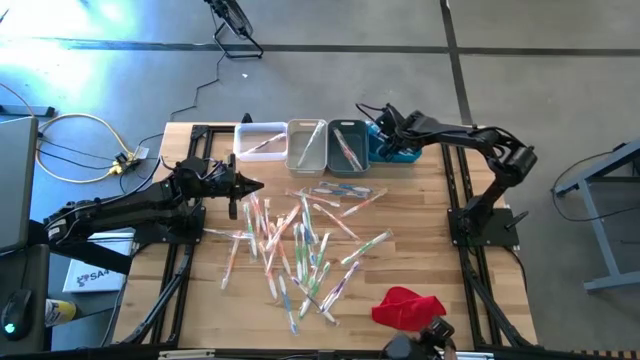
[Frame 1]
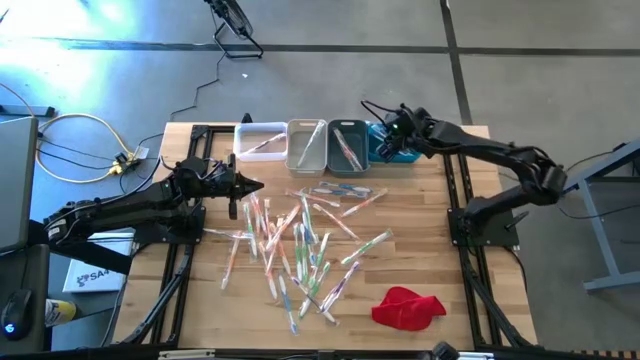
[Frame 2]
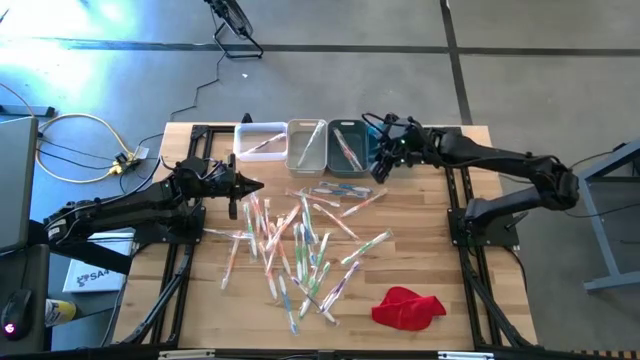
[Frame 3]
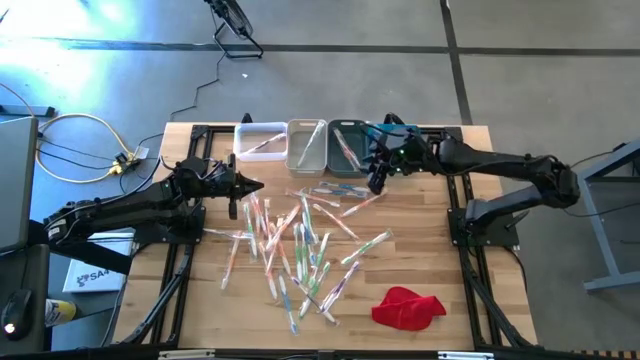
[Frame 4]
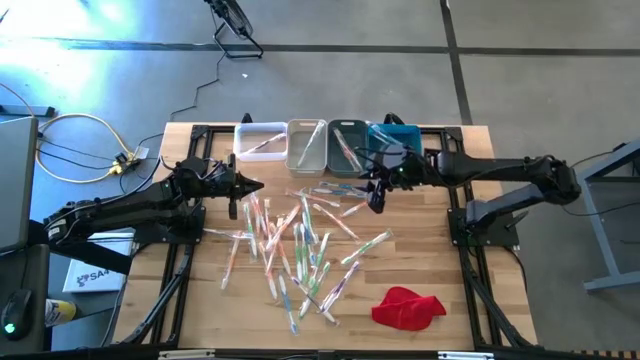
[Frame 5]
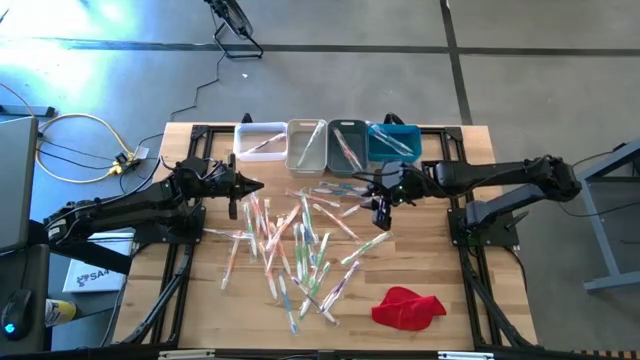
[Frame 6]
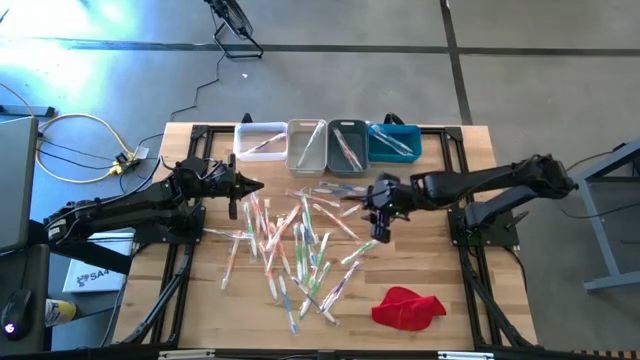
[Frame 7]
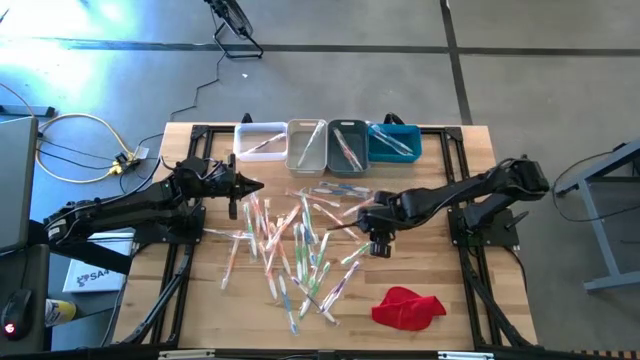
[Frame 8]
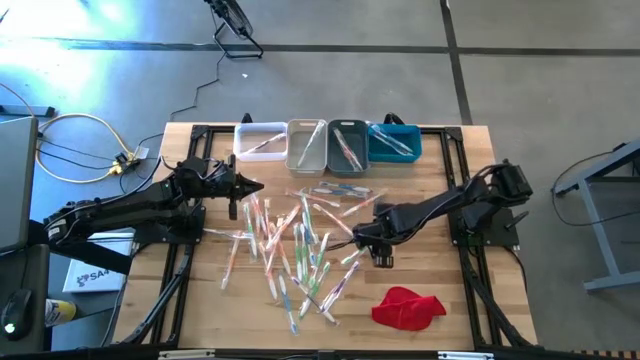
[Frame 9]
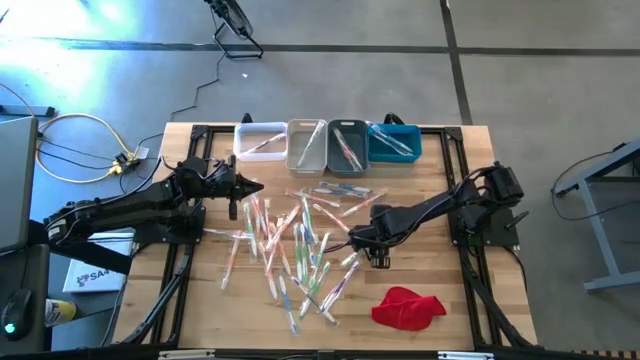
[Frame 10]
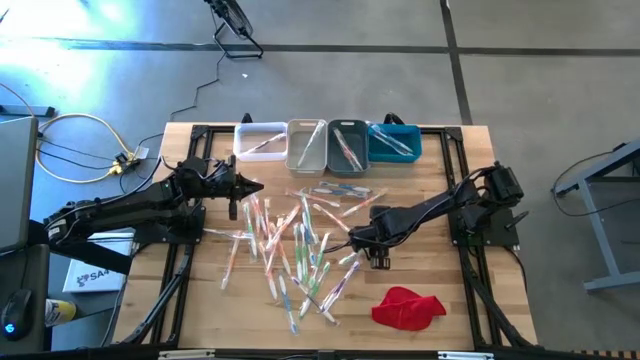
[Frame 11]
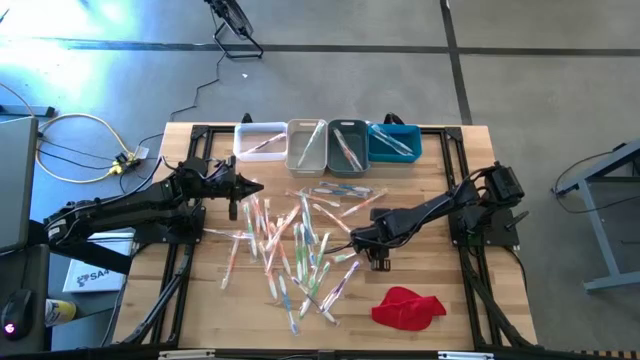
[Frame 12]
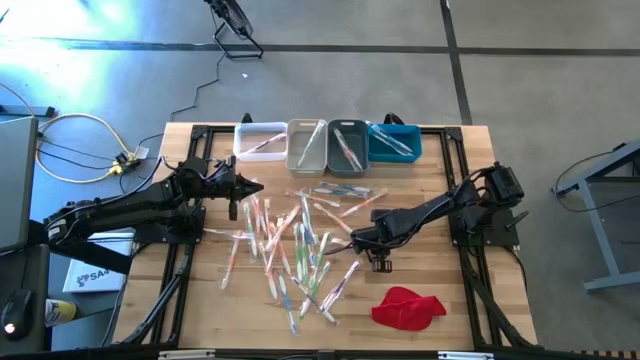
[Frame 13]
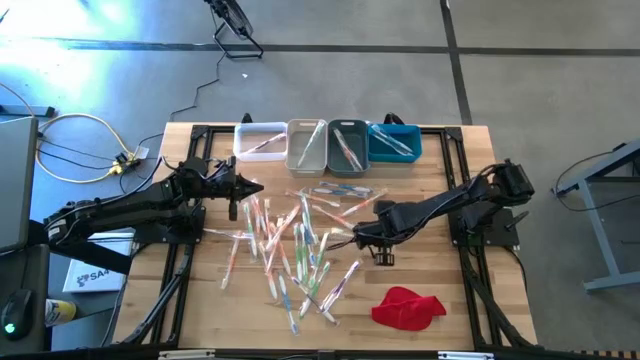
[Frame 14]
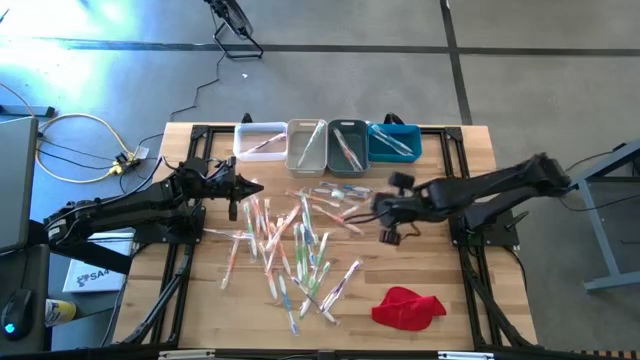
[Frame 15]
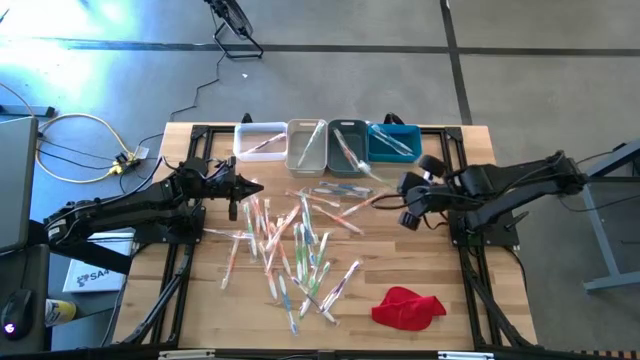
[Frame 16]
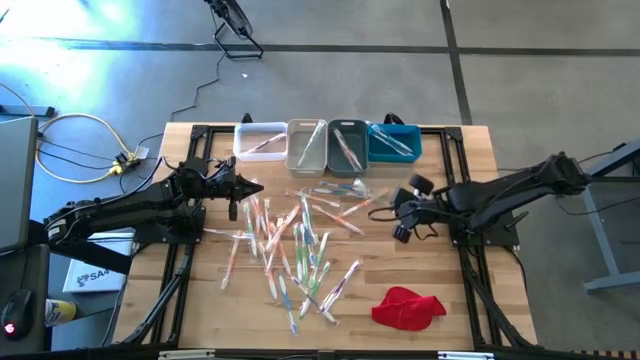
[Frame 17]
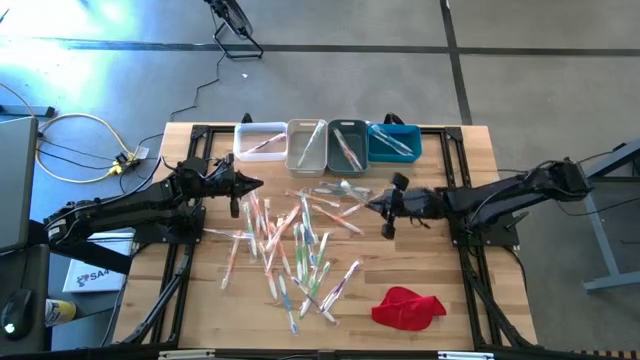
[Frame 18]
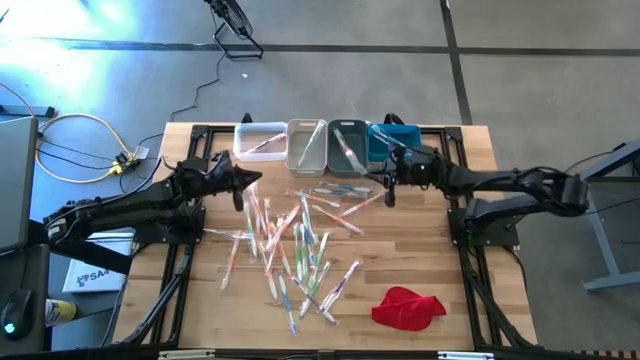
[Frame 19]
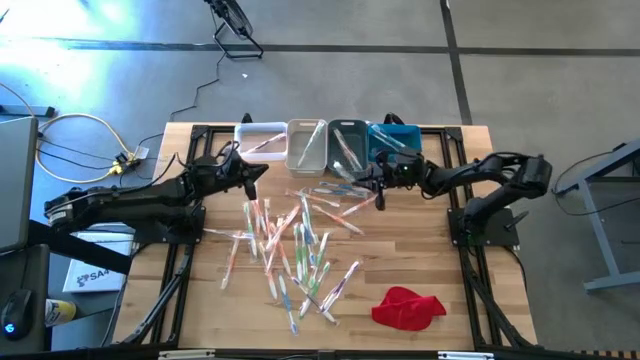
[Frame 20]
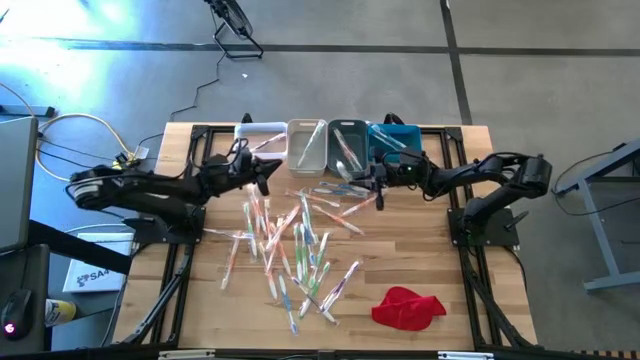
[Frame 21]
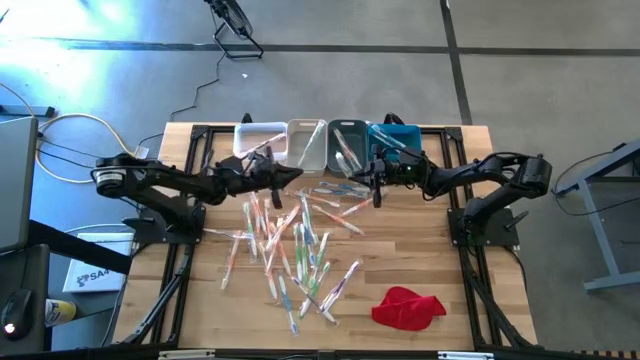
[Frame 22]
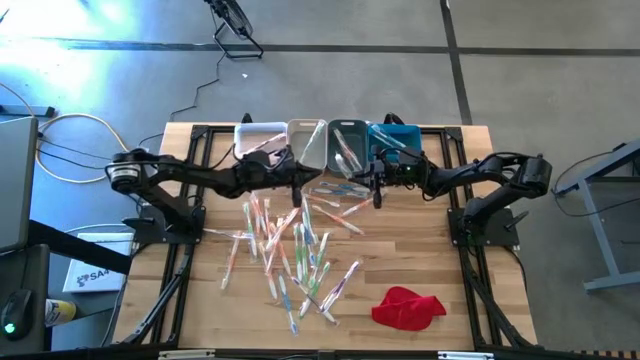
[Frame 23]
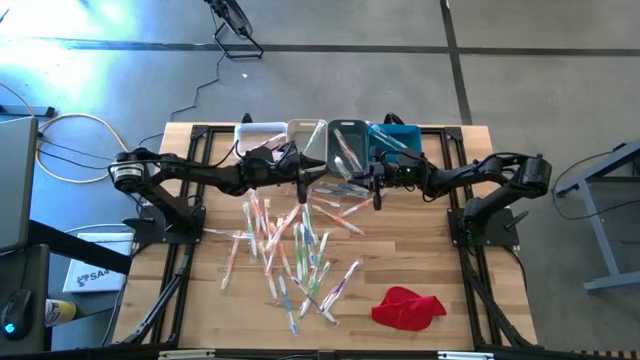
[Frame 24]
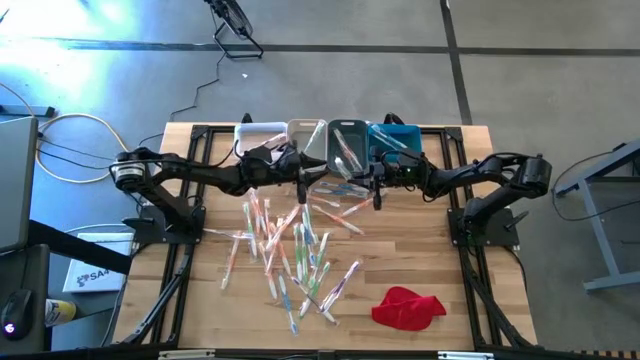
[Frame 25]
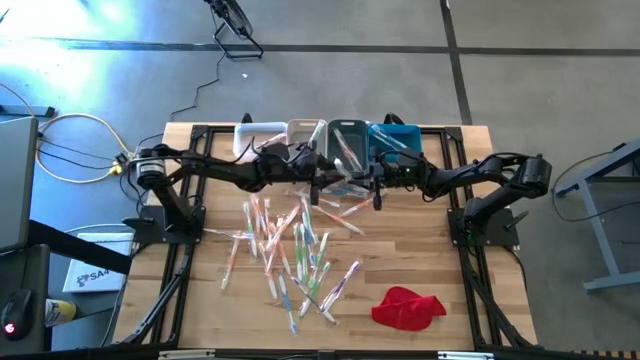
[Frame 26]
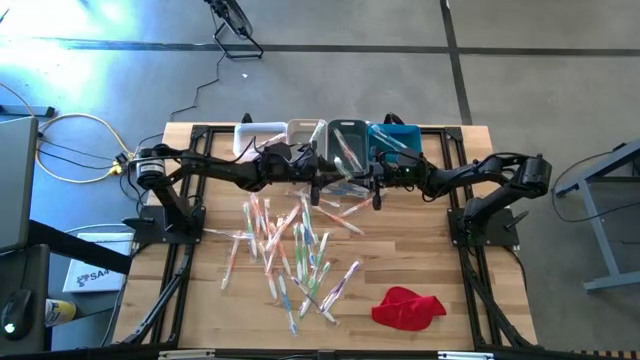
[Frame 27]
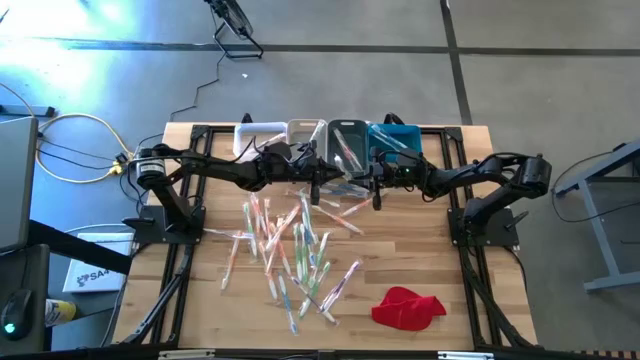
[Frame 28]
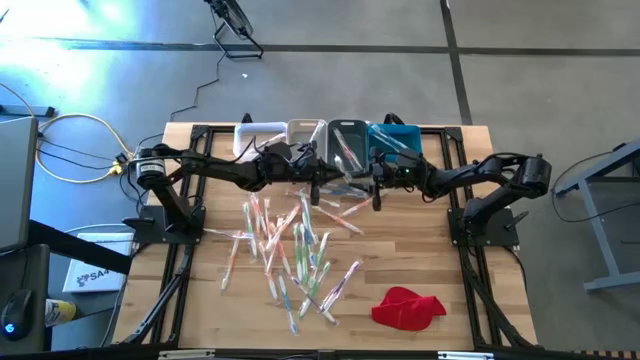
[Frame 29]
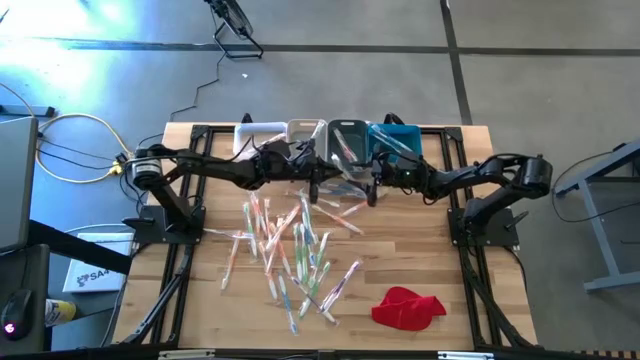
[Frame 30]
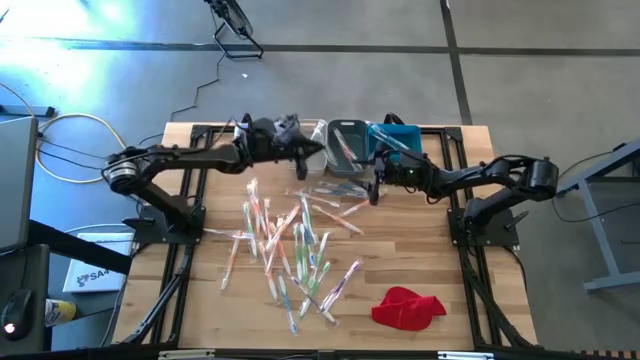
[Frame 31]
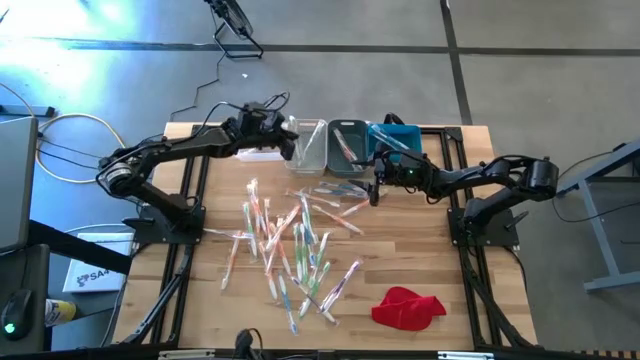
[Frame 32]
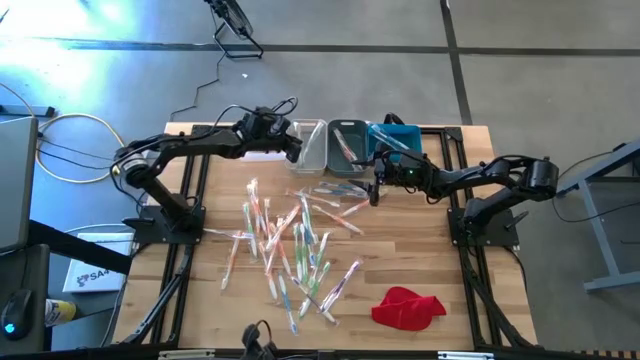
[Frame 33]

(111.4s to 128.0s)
Task: Pick & Place Toothbrushes
Put the green toothbrush into the gray bin

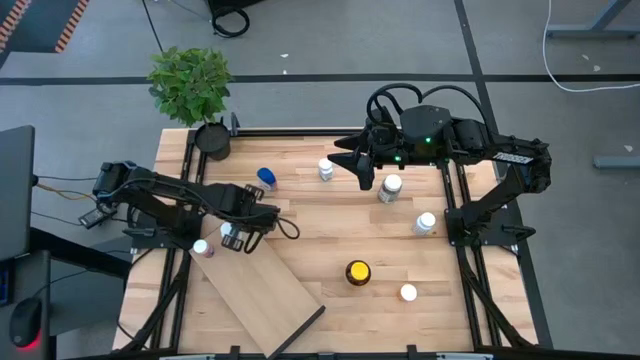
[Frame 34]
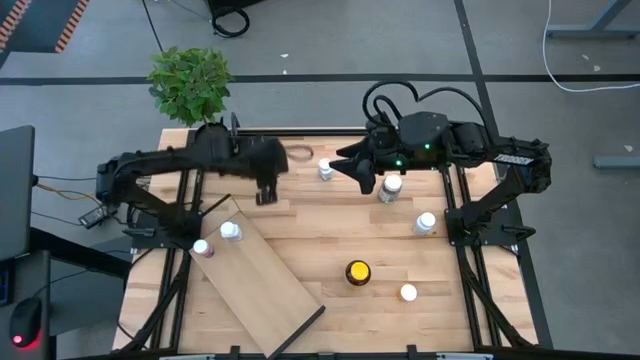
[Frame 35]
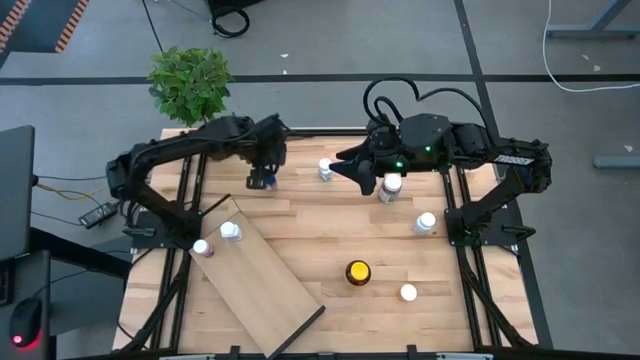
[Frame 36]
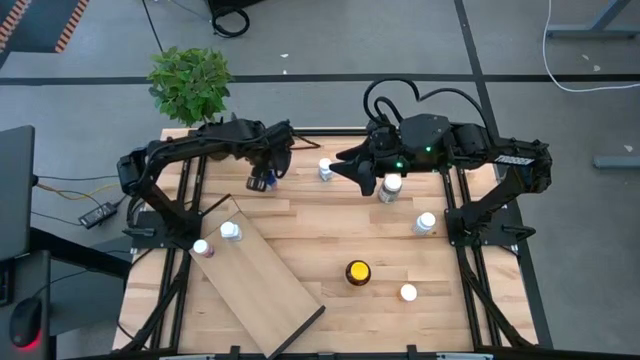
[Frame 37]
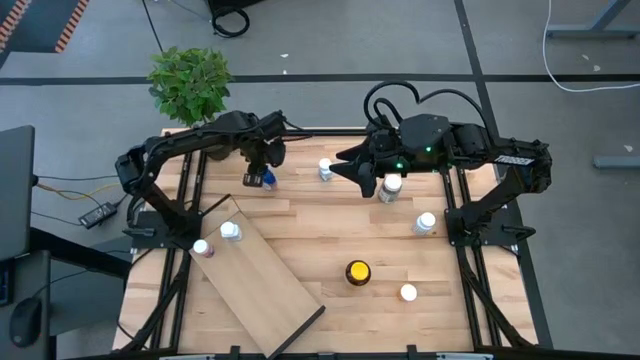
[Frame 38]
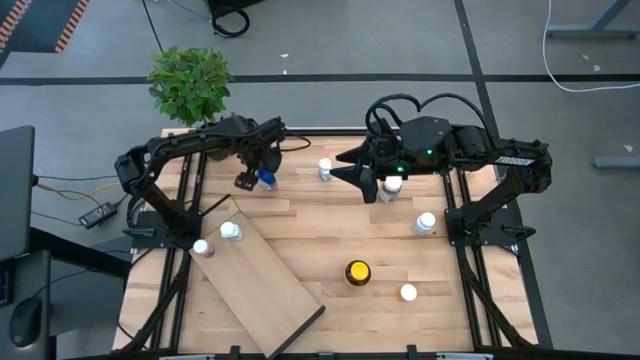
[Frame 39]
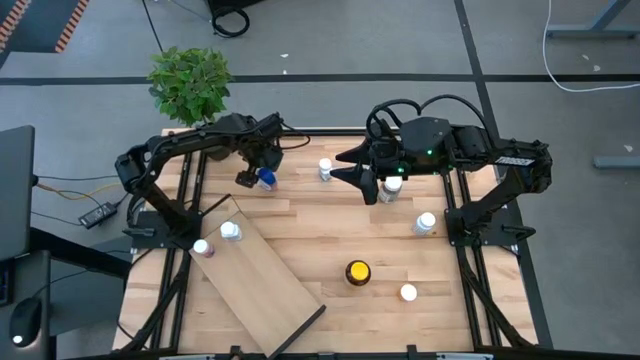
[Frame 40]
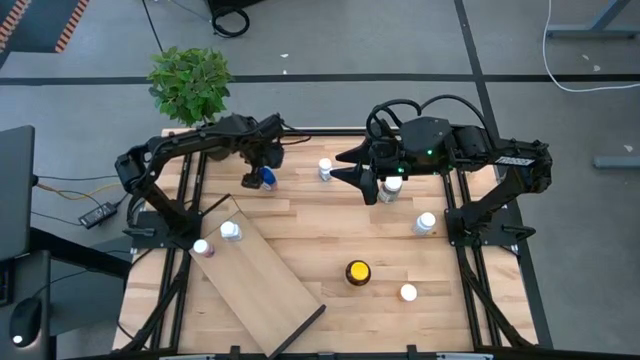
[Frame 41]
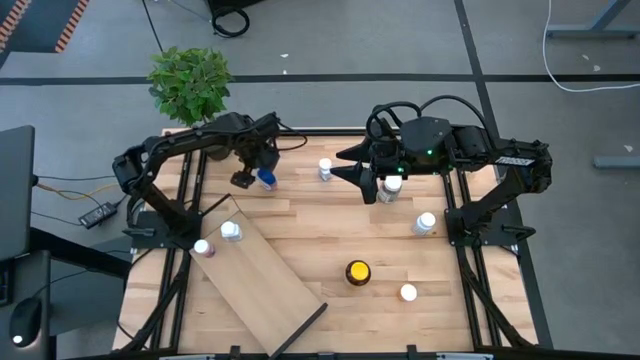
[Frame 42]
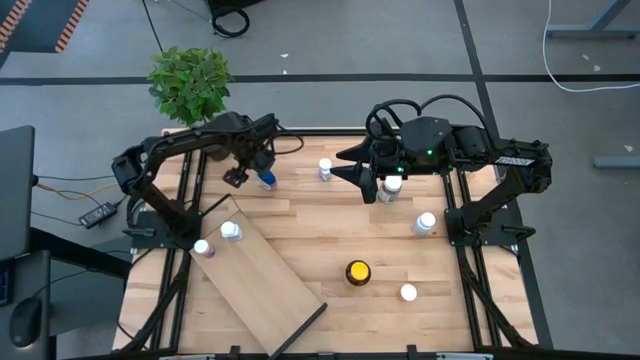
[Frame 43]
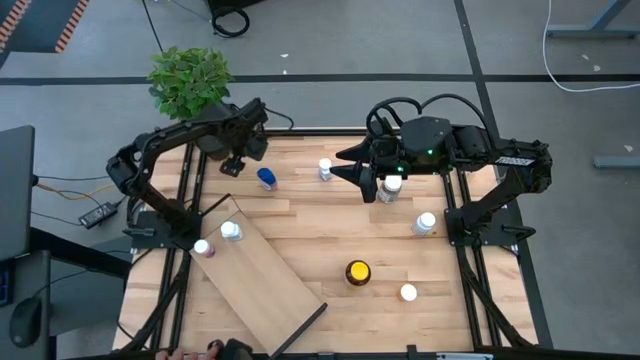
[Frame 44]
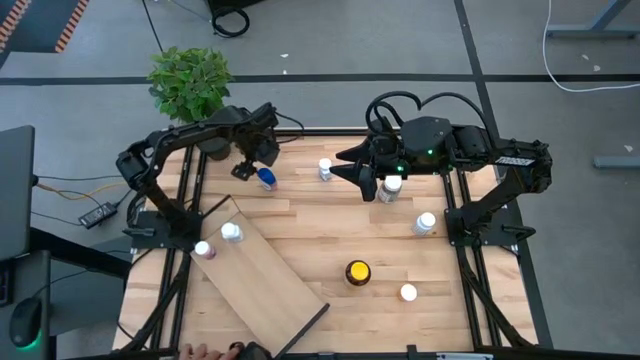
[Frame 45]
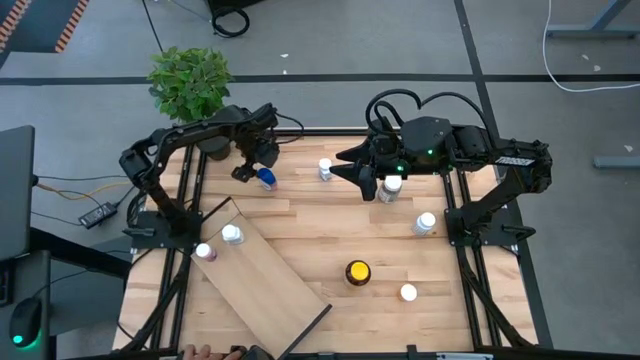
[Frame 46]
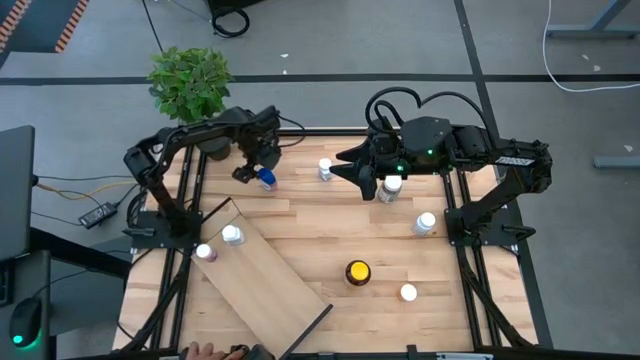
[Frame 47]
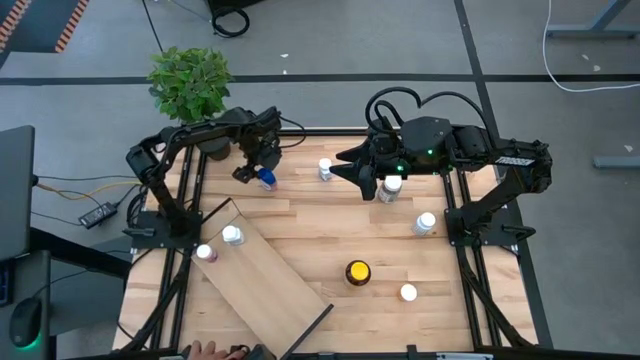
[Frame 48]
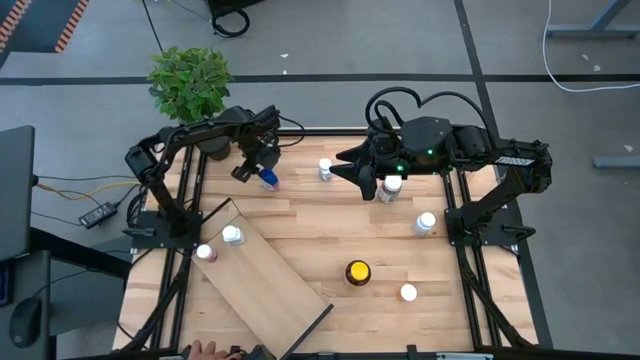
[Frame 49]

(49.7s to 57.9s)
Task: Pick and place medicine bottles onto shelf by color
Put the blue transparent pill bottle on the shelf
